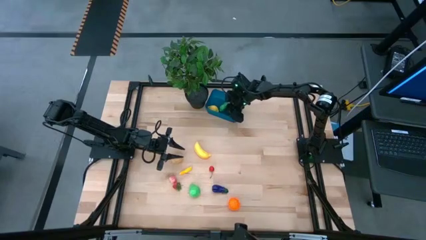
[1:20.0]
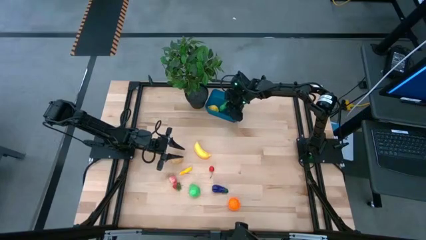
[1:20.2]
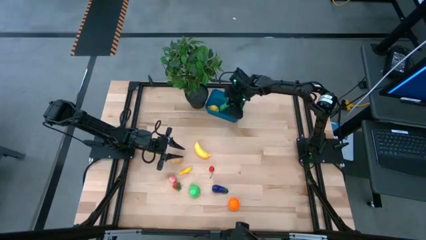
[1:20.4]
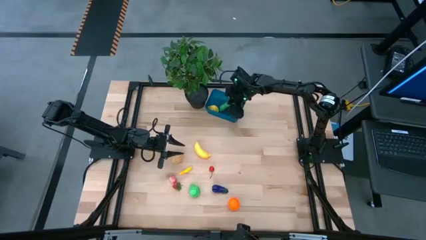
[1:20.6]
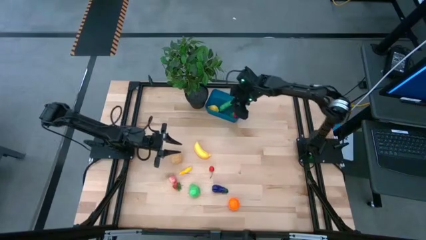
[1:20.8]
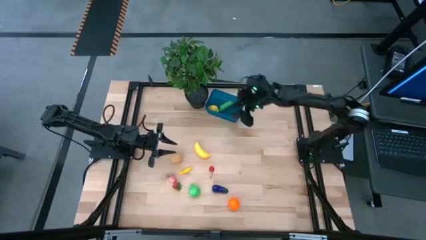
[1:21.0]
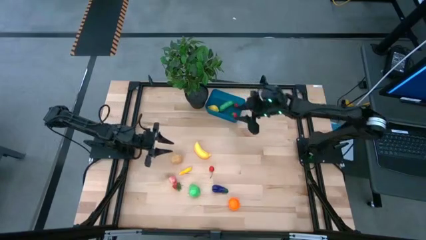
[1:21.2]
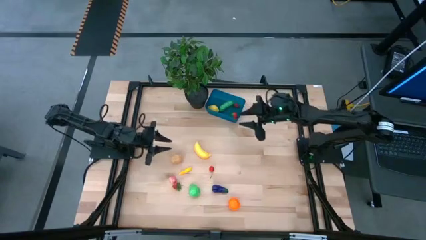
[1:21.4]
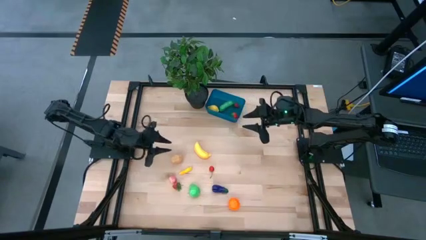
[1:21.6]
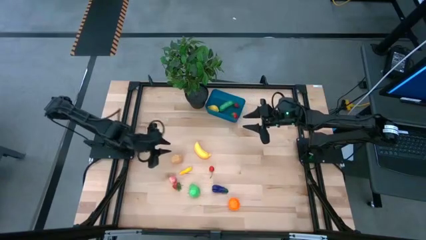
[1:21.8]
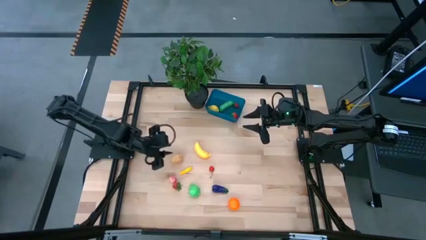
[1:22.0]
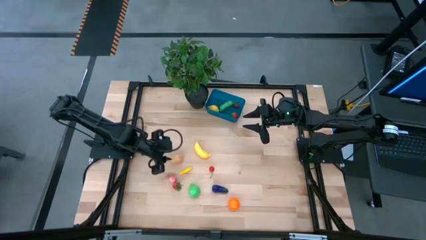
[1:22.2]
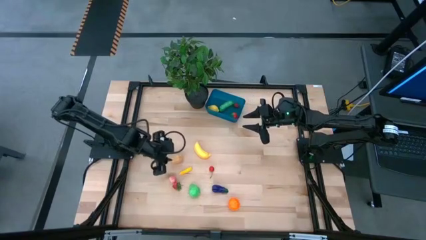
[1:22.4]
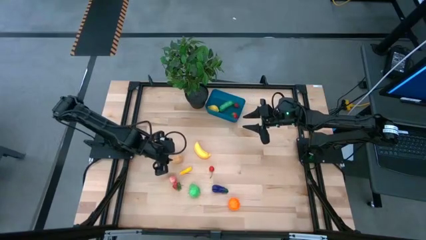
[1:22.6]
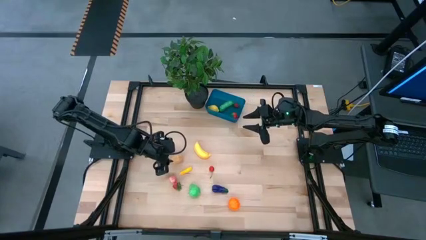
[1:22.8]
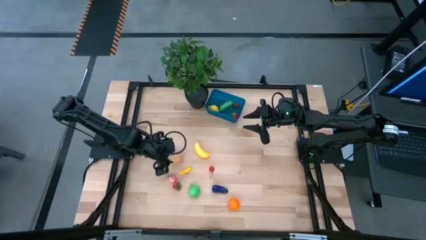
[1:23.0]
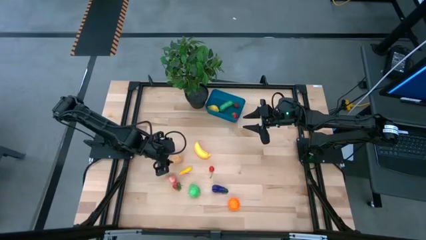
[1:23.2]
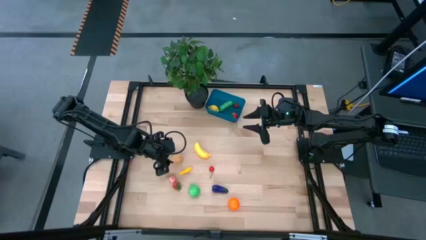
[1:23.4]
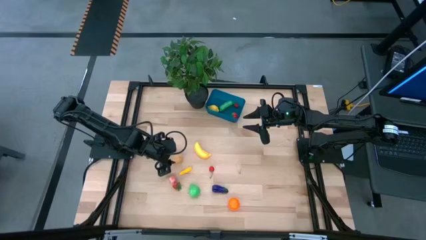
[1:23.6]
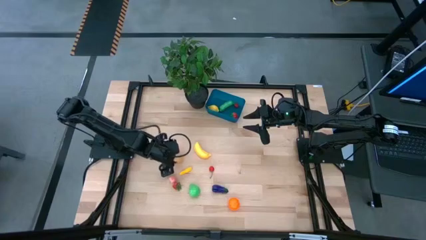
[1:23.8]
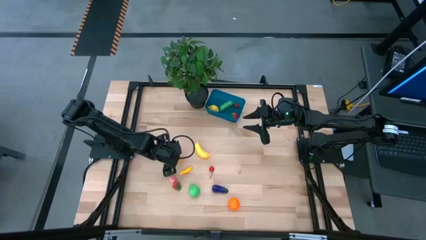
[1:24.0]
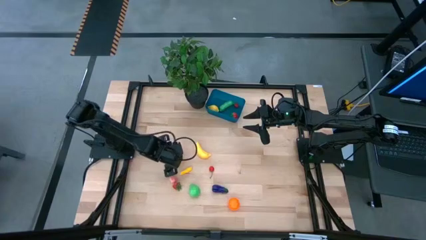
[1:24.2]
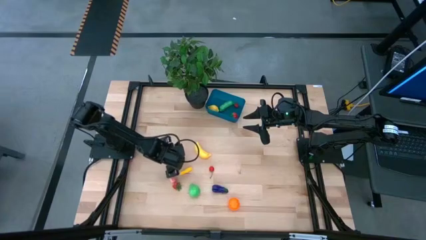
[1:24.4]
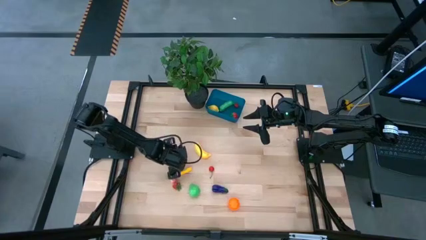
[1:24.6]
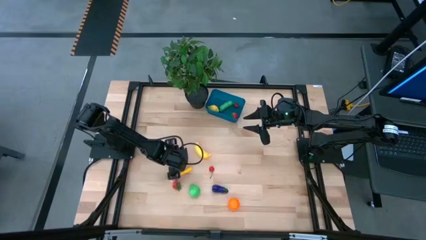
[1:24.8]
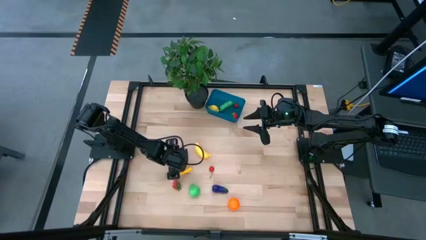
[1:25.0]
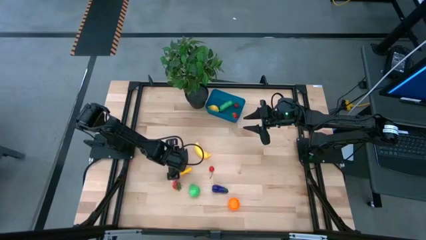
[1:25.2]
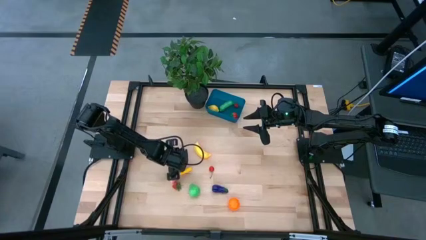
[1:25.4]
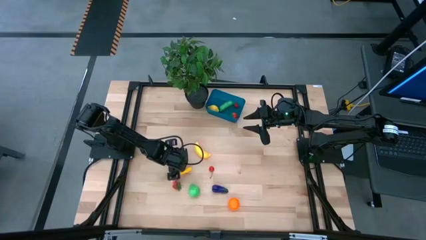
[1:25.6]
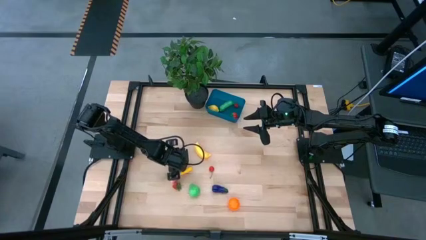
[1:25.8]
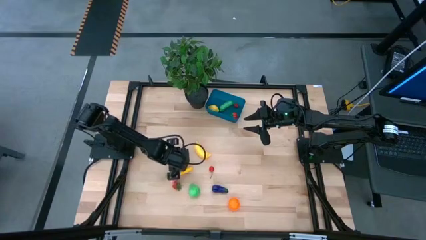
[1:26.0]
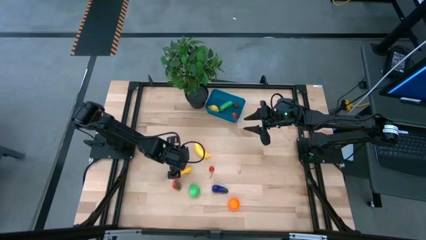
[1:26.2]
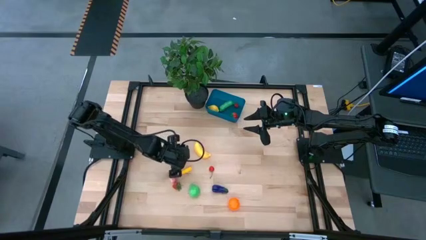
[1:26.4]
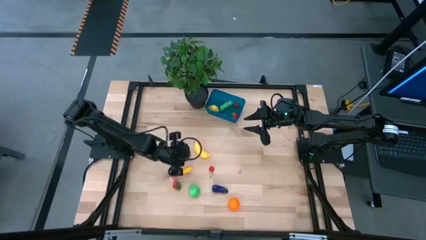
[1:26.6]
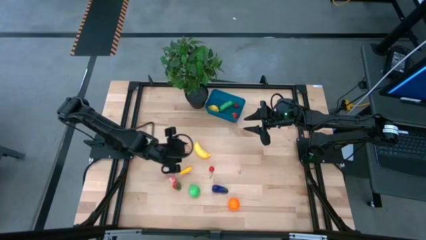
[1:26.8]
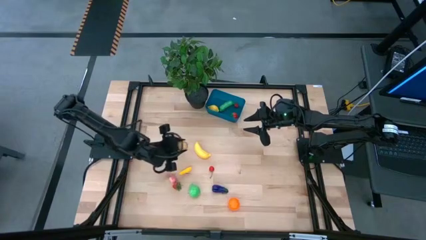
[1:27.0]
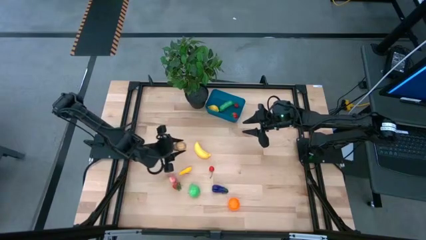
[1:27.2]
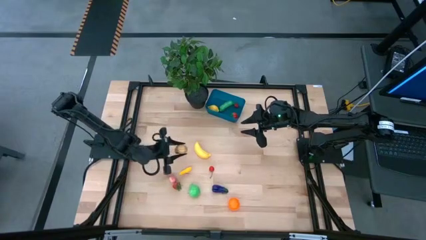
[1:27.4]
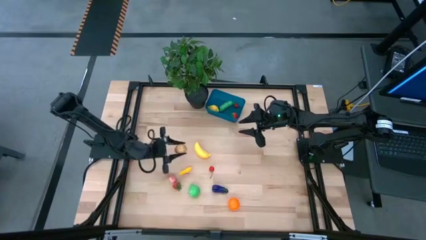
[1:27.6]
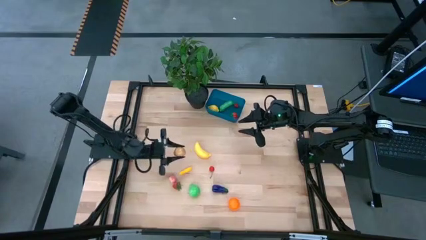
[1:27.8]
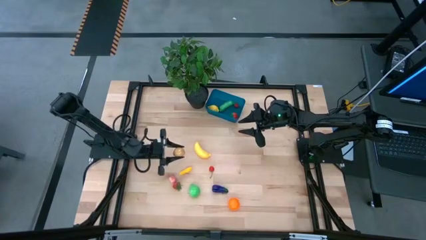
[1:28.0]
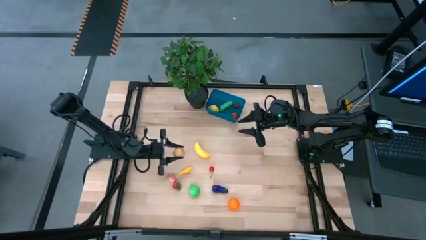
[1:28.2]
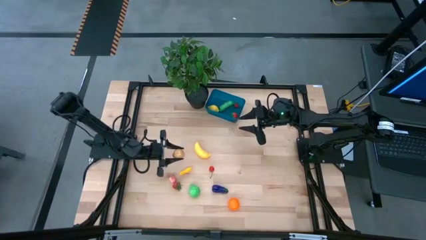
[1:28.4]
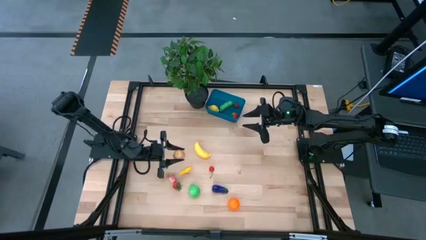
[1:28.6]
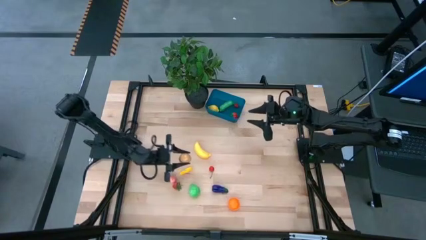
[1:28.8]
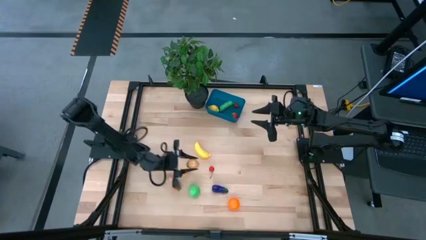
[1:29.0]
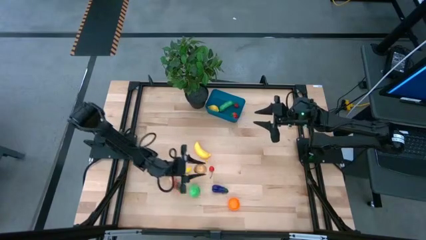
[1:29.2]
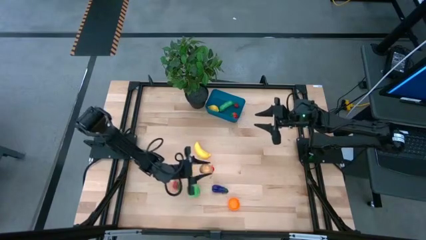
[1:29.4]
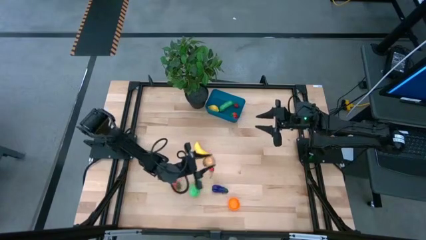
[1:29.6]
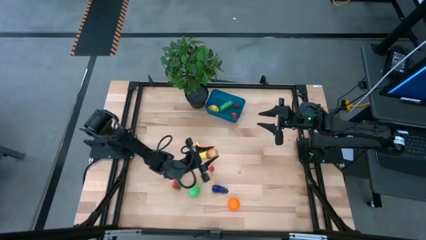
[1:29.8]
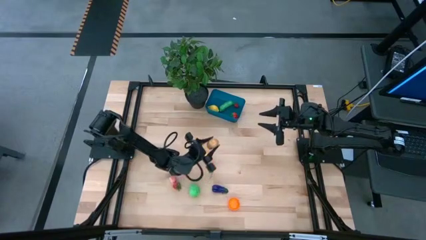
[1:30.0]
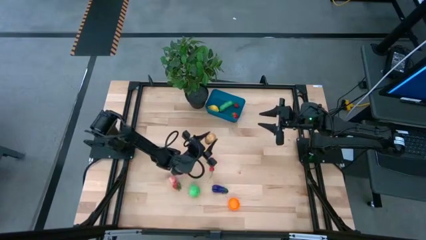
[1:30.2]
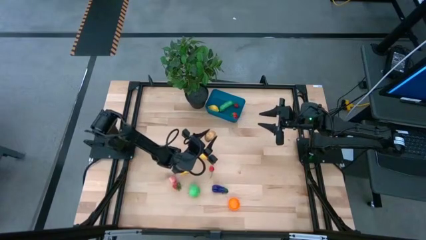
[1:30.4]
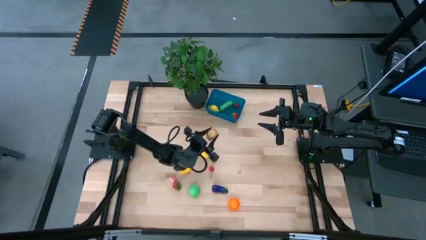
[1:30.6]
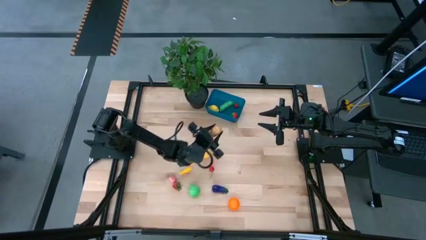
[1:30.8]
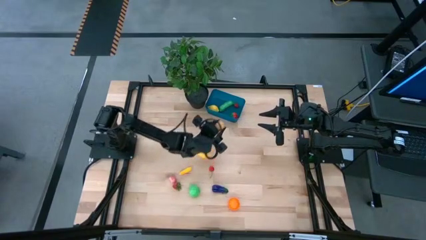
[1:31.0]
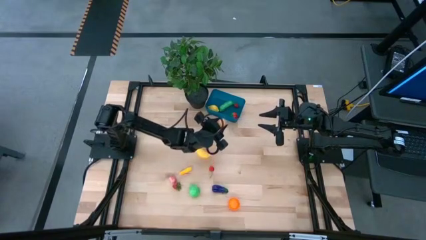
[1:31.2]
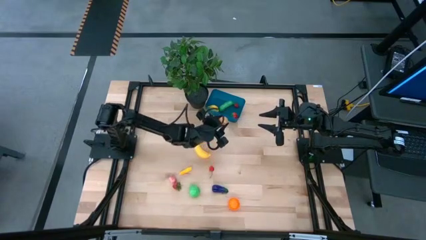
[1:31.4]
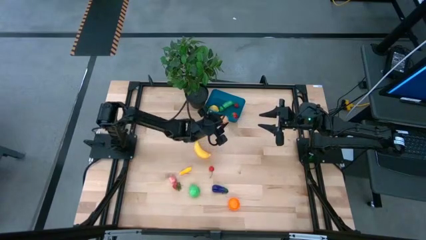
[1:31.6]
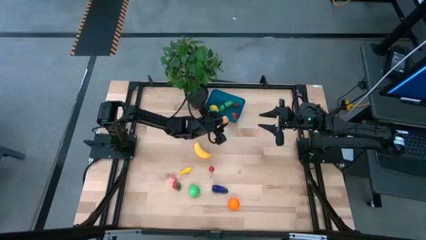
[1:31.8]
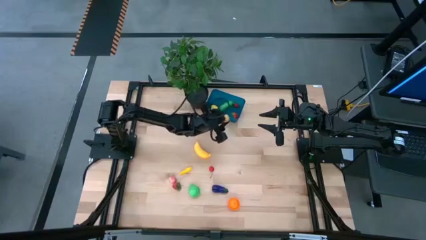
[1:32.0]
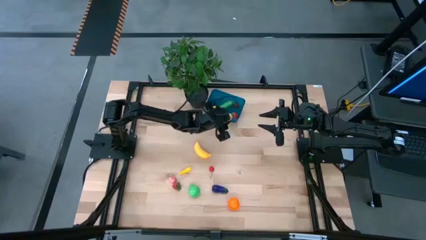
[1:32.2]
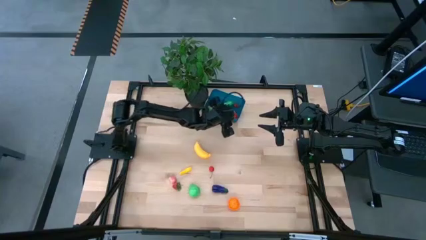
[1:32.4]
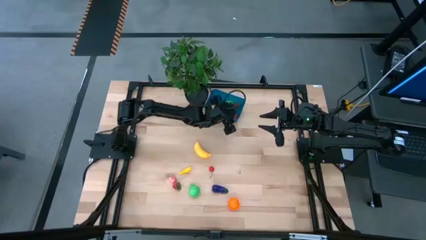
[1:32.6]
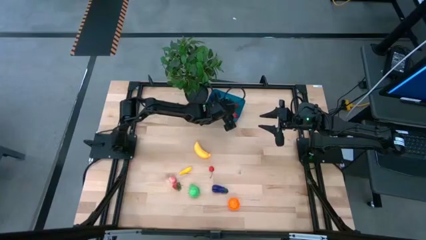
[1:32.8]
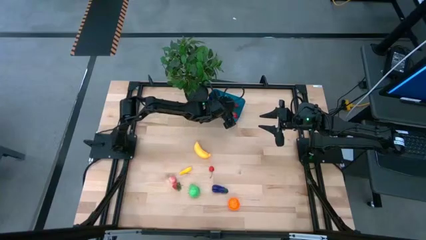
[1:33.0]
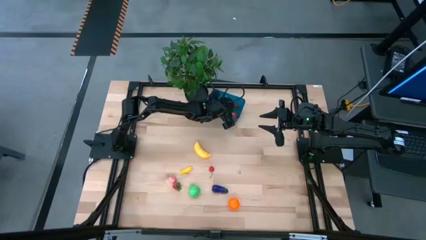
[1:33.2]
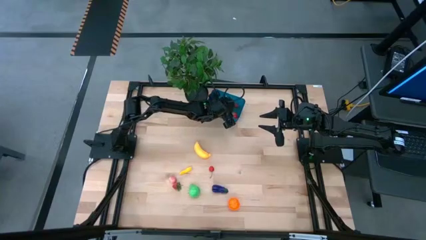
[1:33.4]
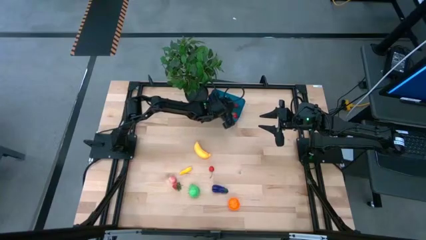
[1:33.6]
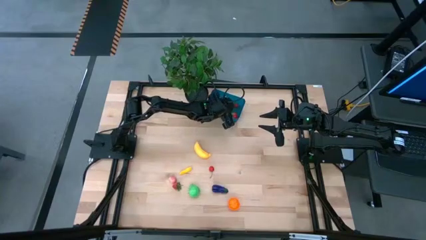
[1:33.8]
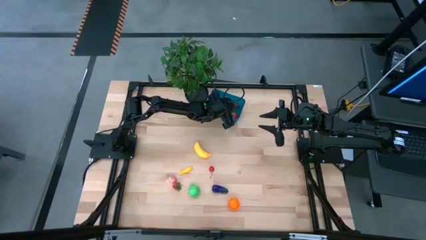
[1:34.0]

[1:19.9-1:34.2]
Task: Pick and placing Produce into tupperware
Put the brown potato into the blue container
